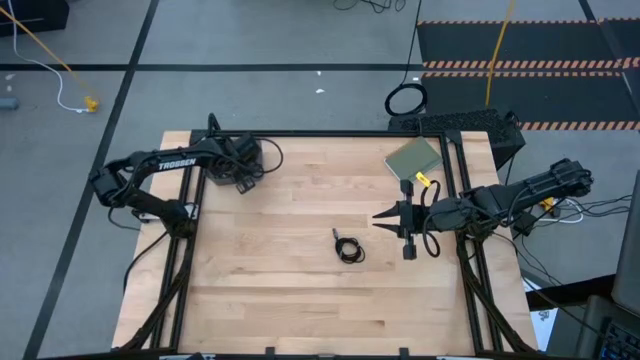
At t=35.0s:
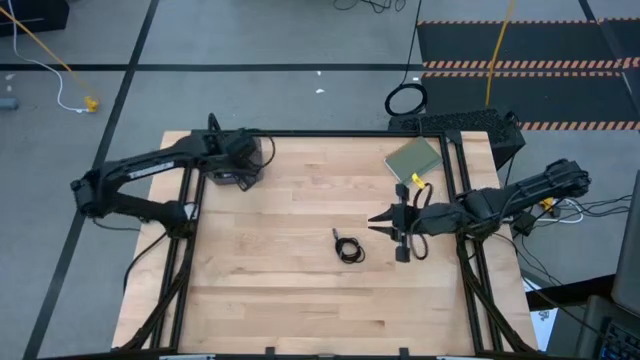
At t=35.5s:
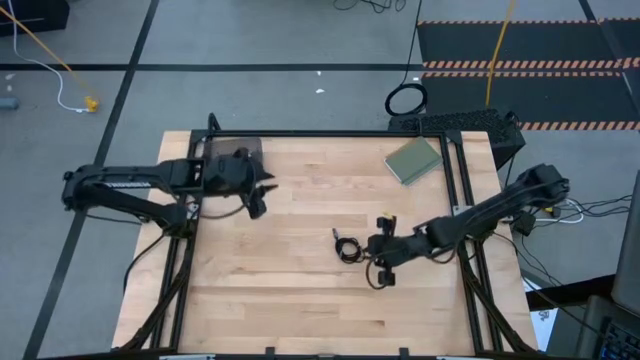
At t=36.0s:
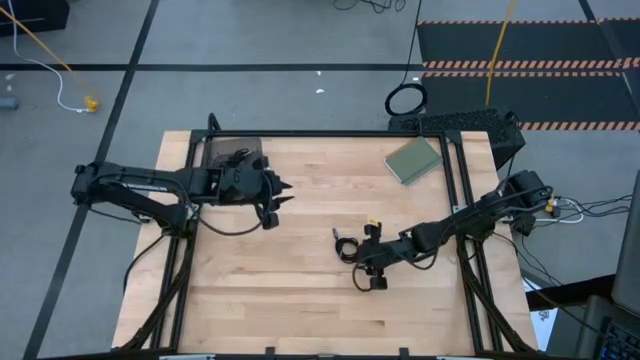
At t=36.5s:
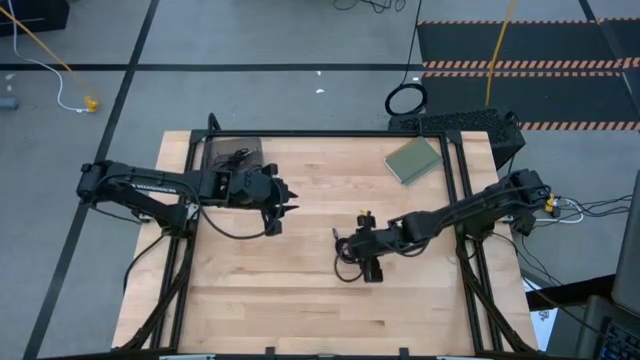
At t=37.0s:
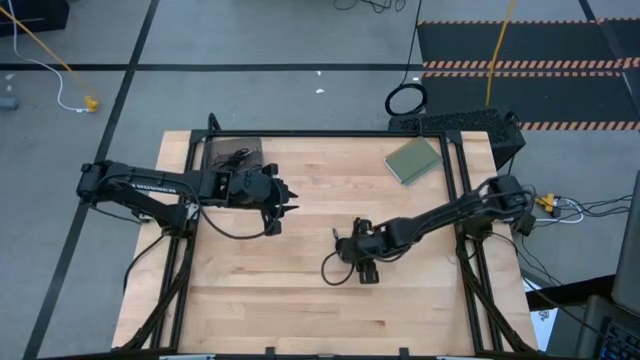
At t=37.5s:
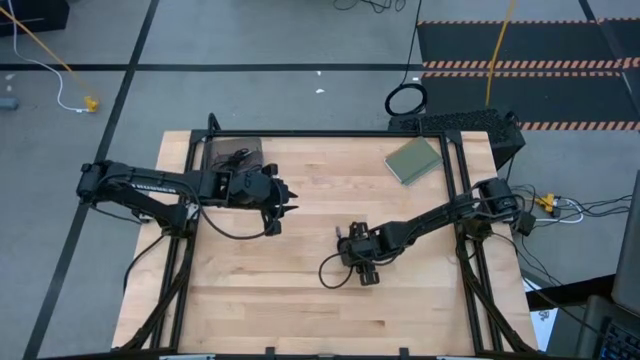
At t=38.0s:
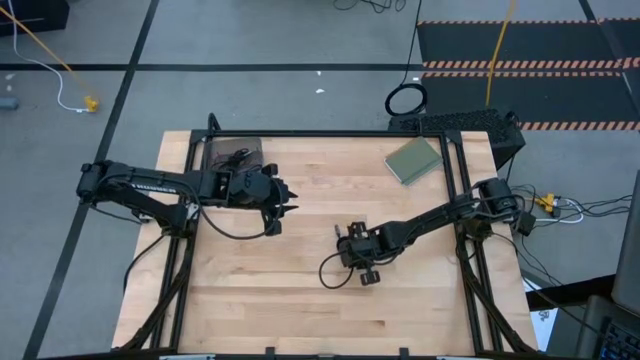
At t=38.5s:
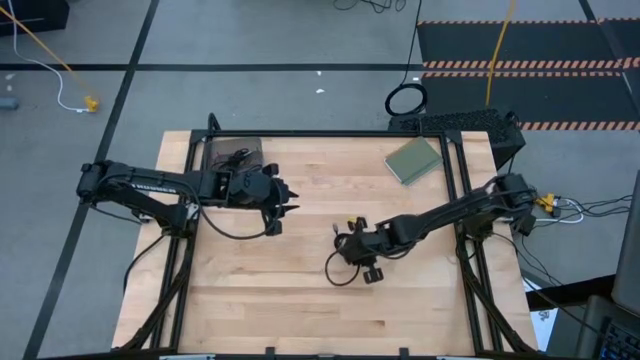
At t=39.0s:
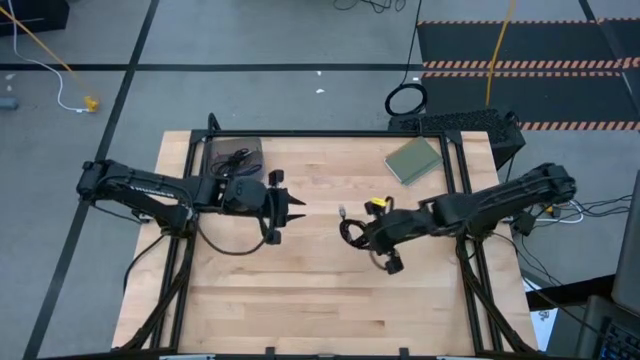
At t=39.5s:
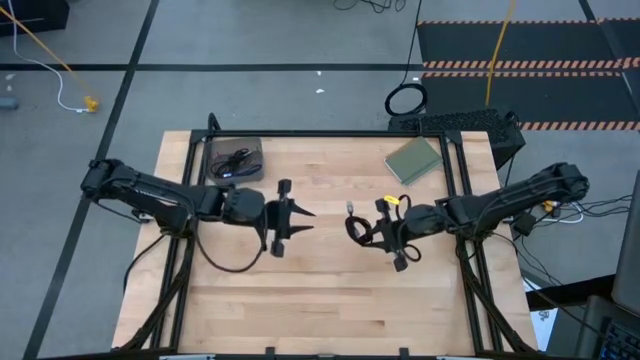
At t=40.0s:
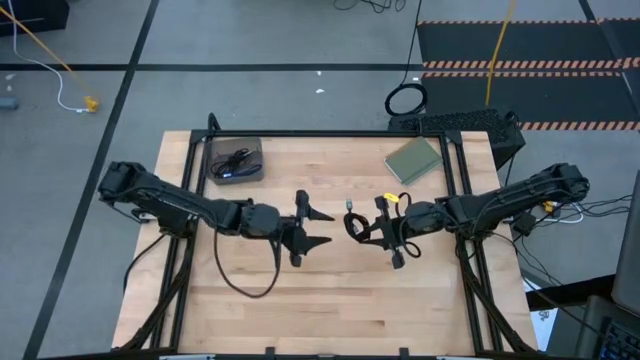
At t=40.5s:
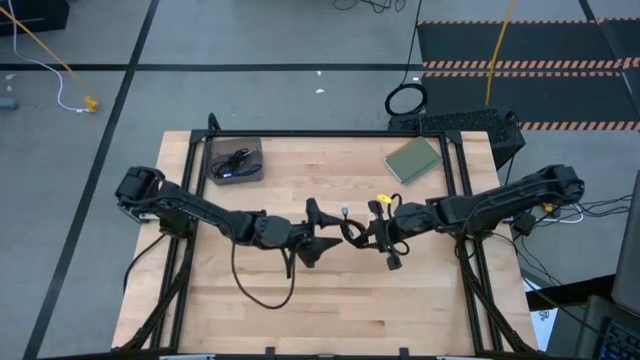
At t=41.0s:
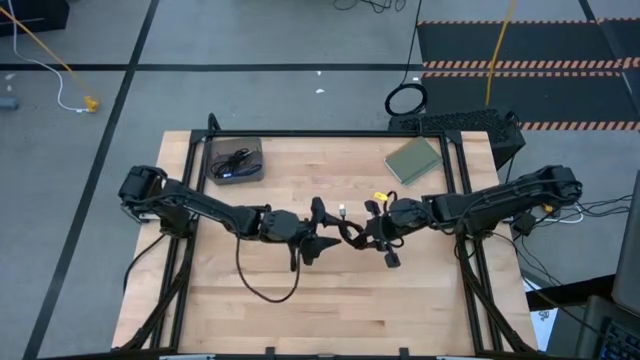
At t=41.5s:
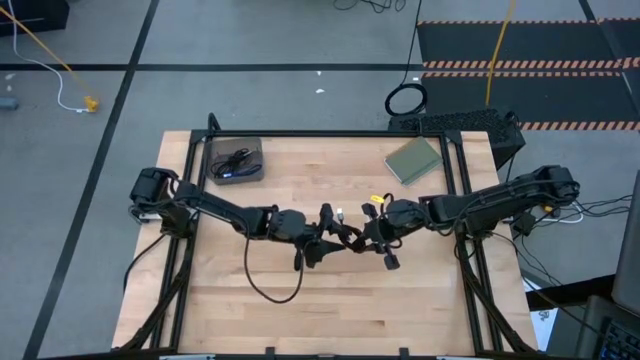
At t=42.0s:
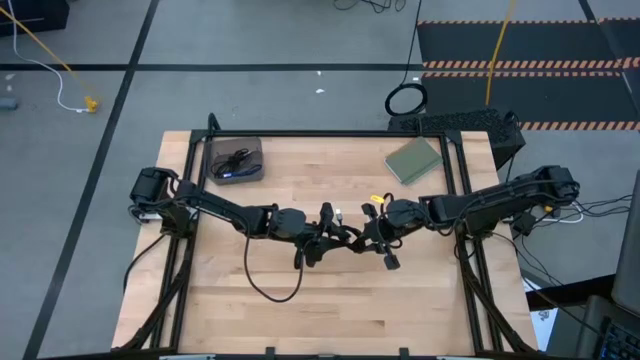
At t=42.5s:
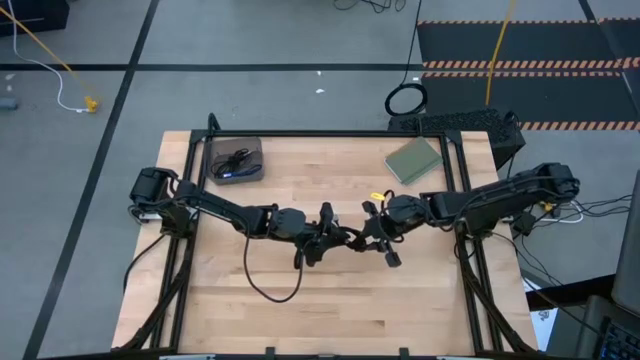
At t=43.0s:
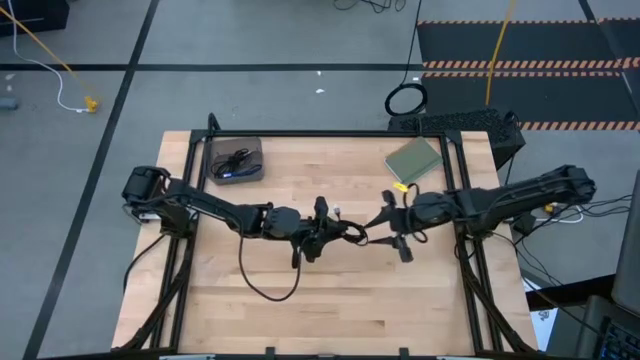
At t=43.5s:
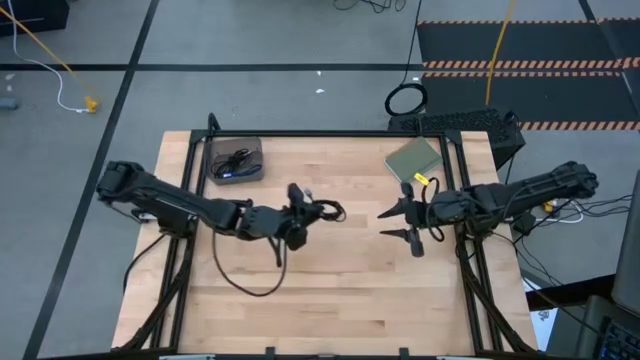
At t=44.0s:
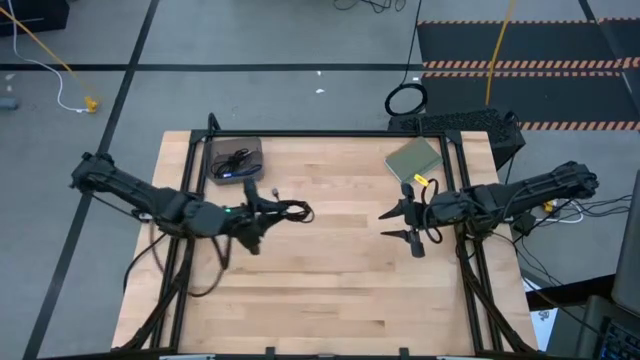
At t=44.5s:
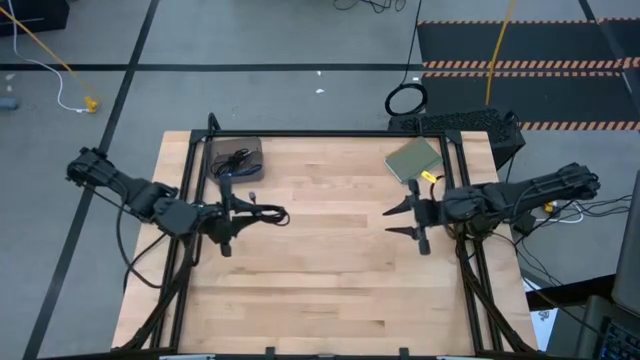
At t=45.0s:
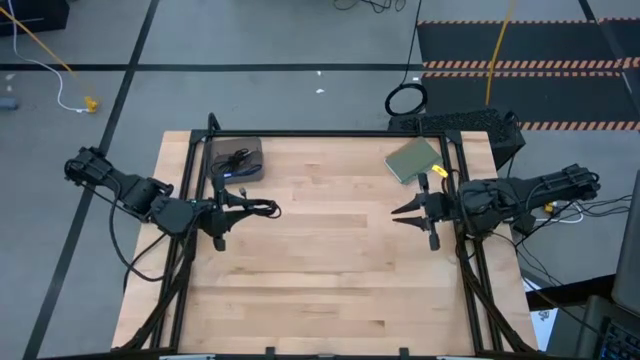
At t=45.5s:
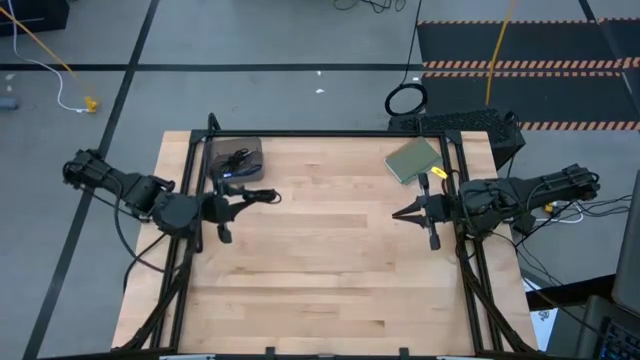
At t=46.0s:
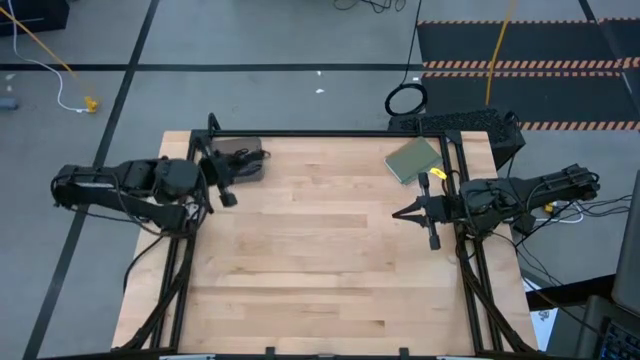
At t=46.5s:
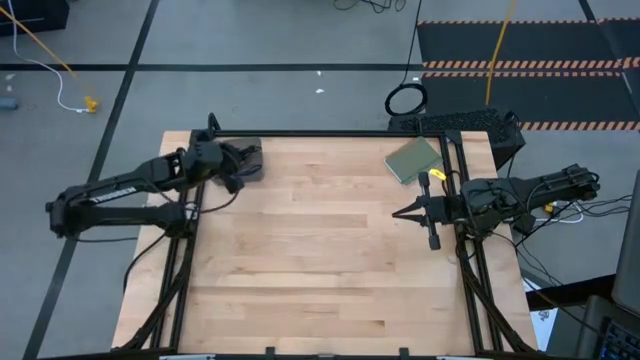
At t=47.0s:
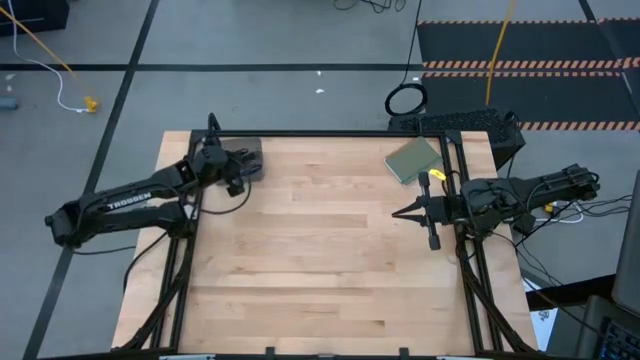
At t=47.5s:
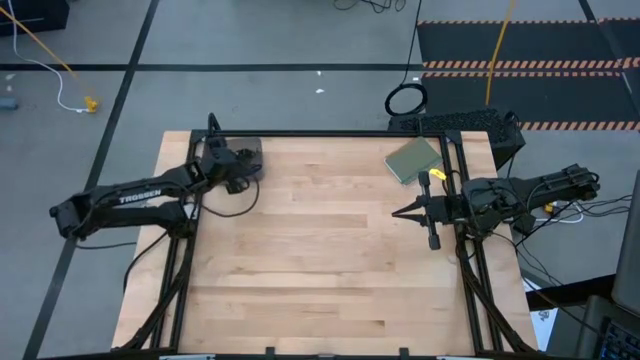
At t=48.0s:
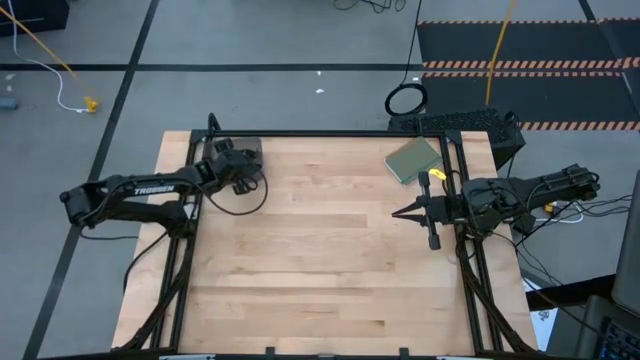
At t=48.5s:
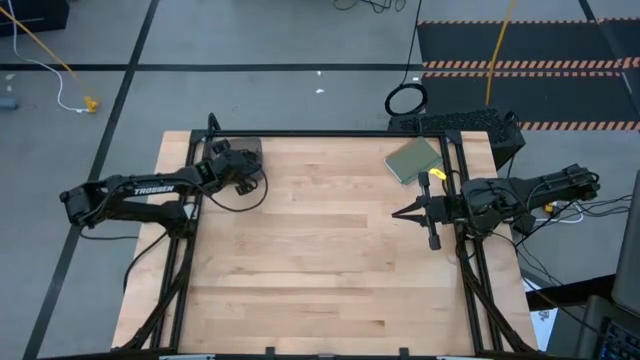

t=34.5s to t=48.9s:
Task: Pick and place USB-C Cables
Put the black charger cable into the black bin

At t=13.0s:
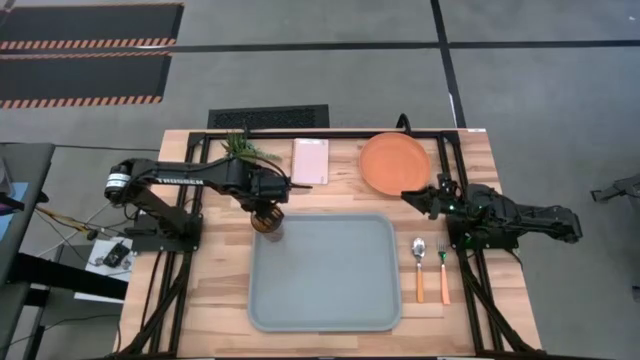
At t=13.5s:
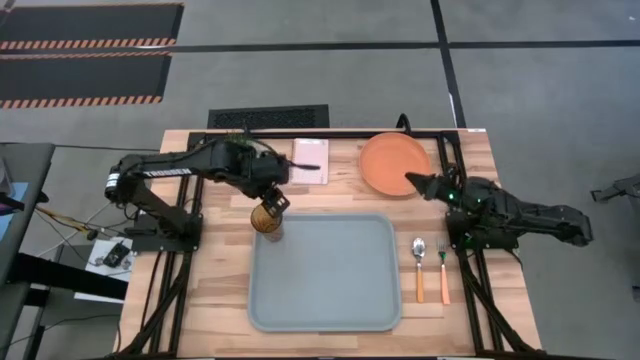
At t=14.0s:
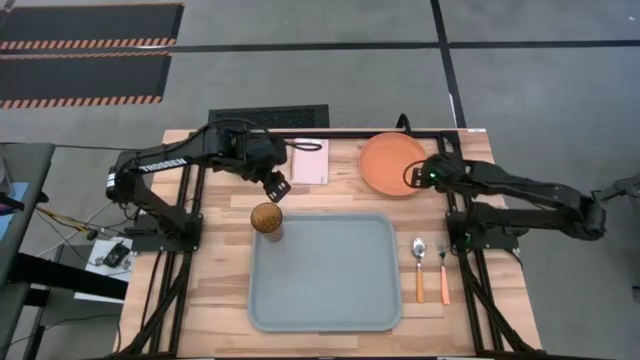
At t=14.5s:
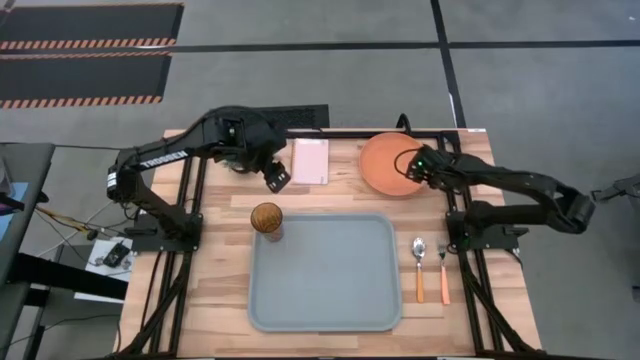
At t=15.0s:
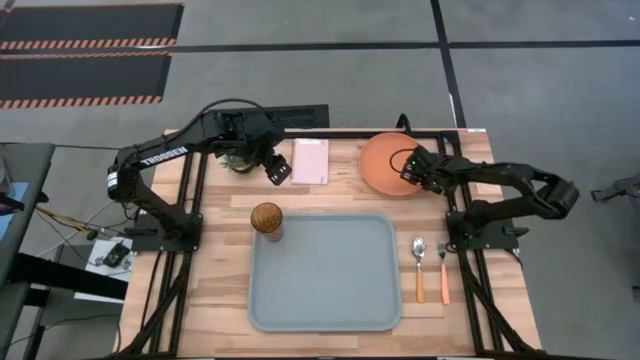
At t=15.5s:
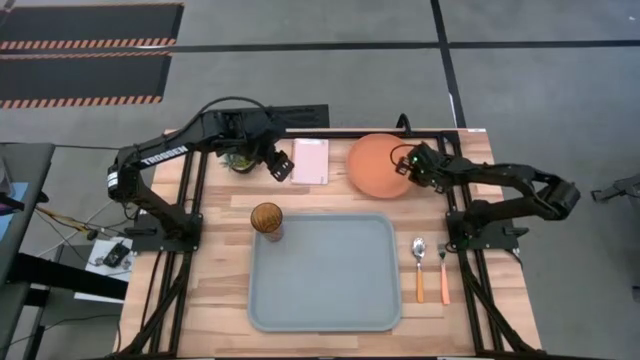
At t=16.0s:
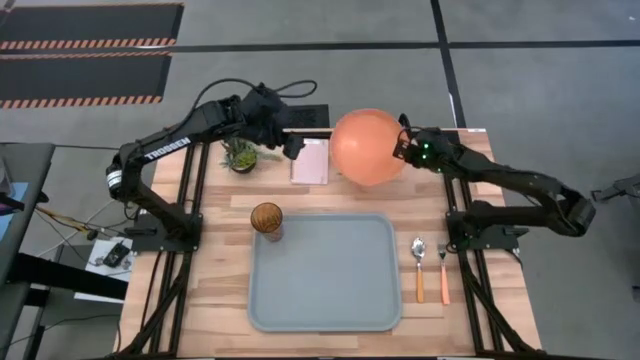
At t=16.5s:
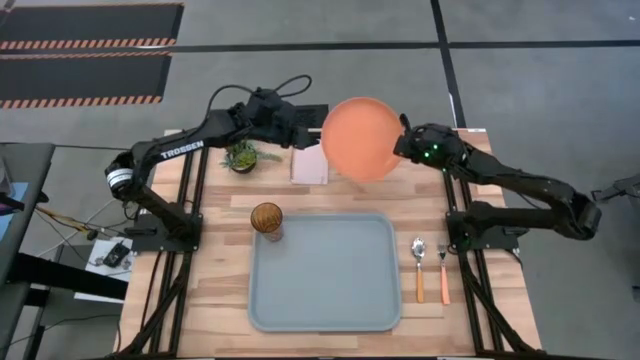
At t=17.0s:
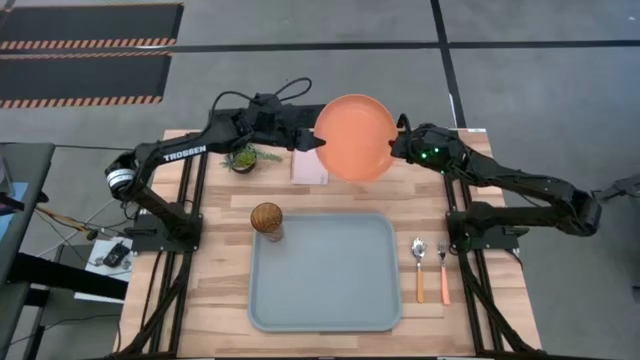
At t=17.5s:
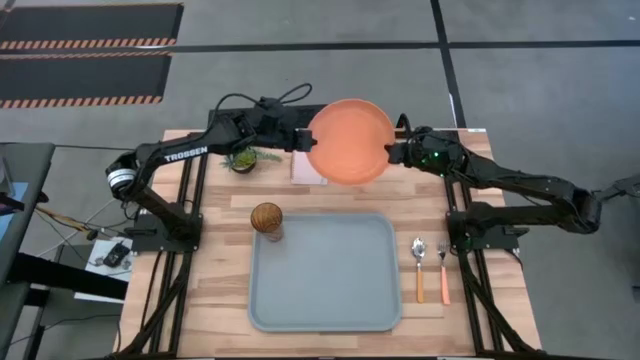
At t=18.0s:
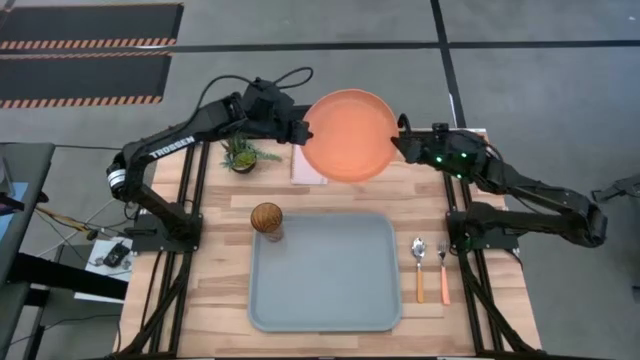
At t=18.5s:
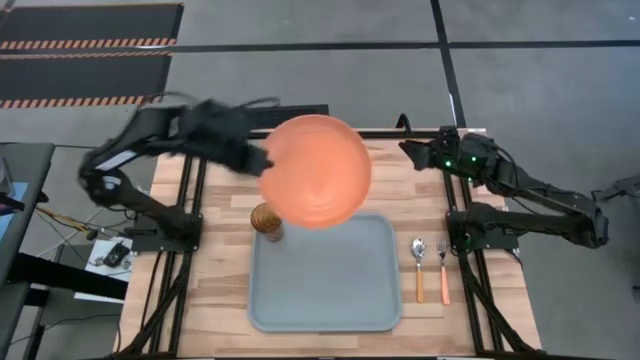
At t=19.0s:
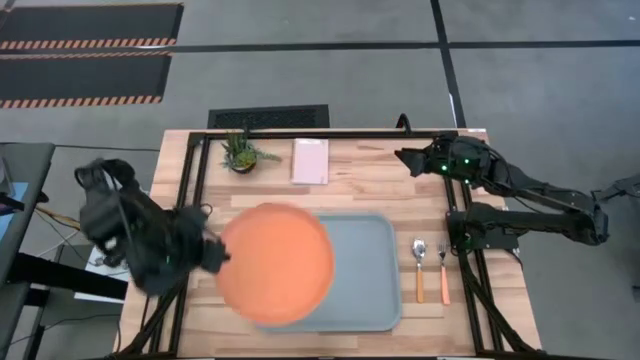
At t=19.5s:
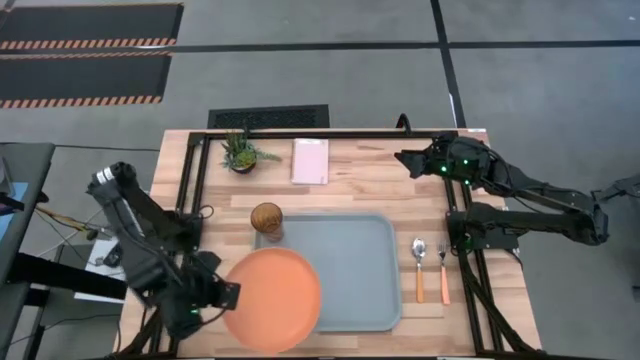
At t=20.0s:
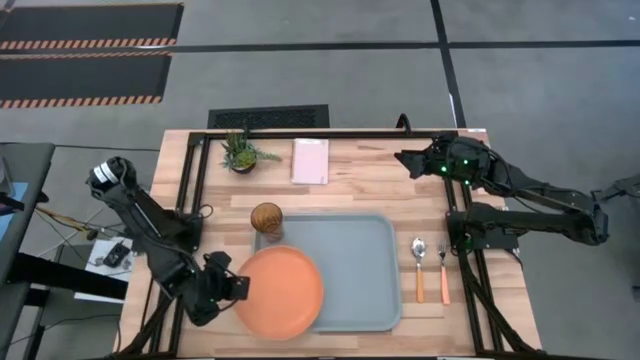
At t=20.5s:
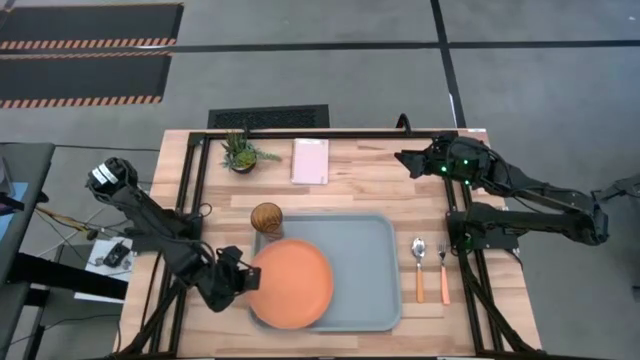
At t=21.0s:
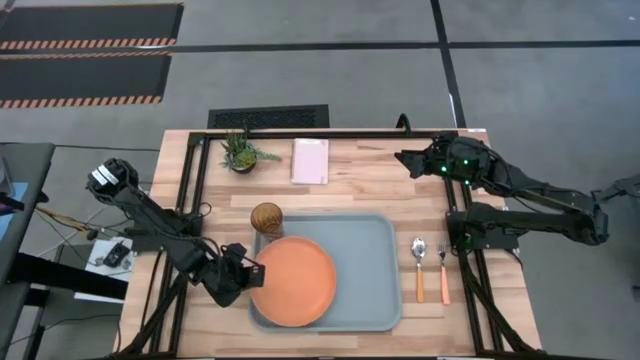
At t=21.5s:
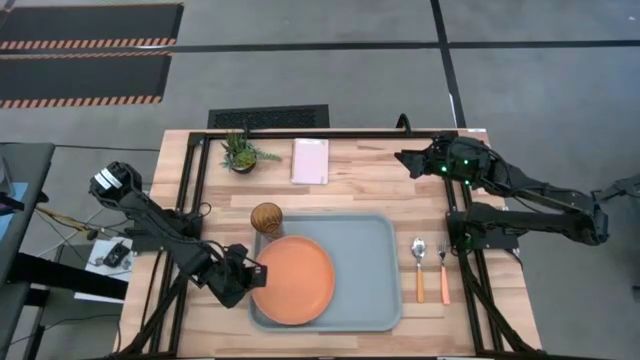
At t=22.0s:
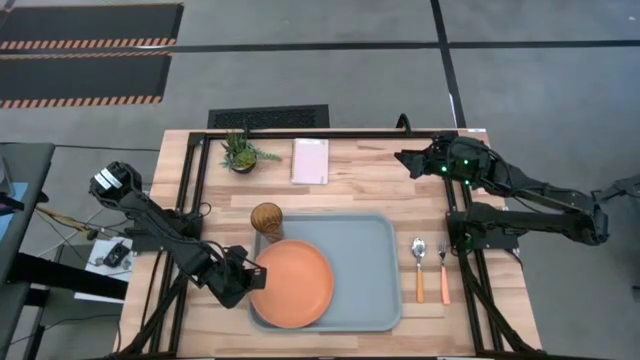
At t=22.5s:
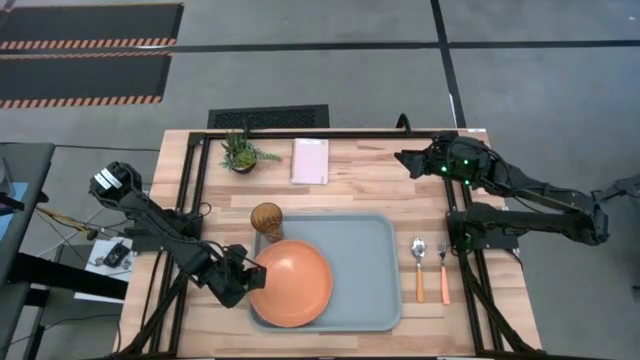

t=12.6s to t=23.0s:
Task: Pick and place plate/cup/fork/spoon on tray
Put the orange plate on the gray tray below the brown glass
